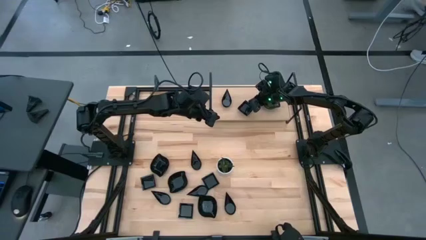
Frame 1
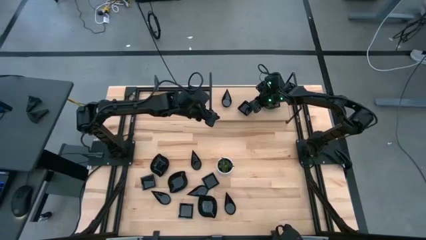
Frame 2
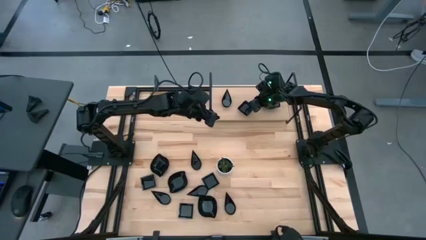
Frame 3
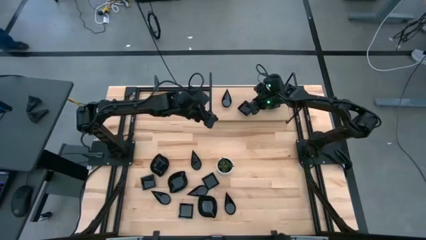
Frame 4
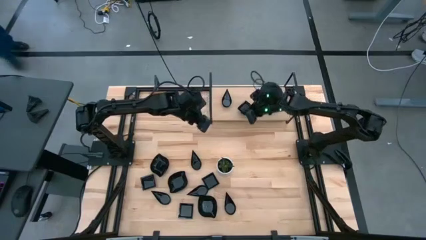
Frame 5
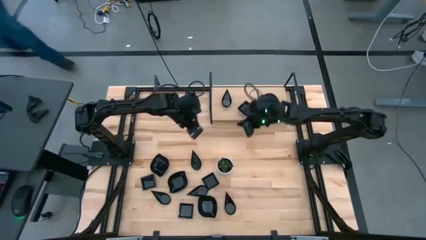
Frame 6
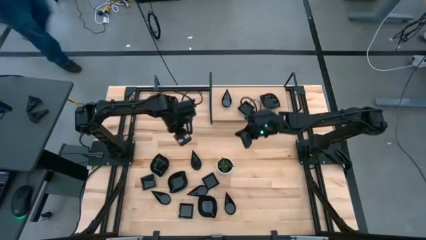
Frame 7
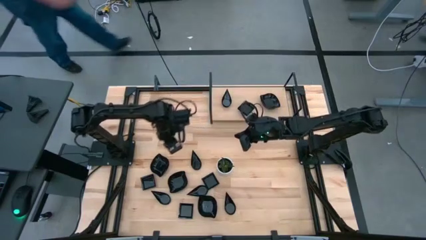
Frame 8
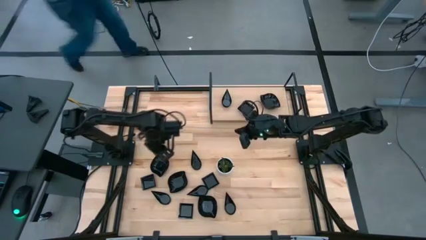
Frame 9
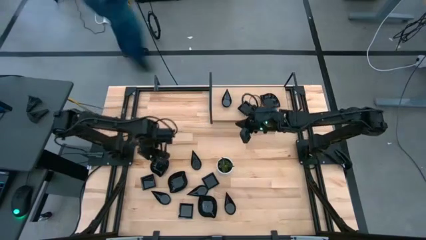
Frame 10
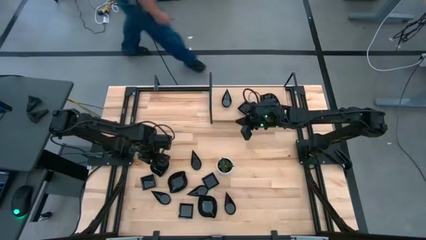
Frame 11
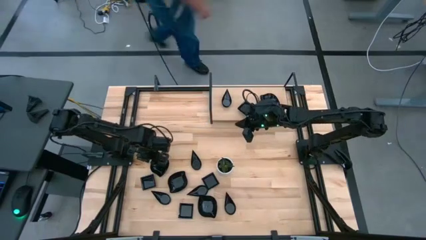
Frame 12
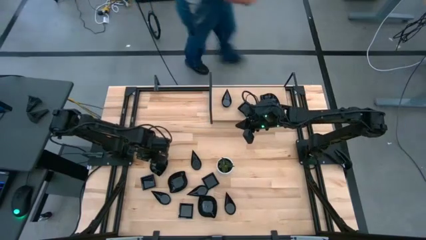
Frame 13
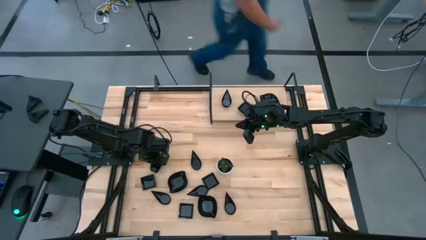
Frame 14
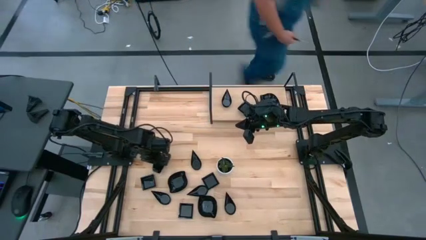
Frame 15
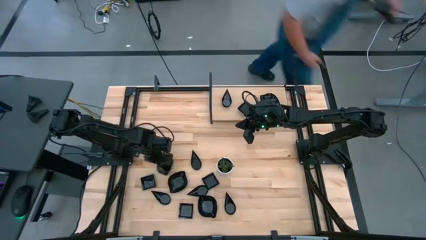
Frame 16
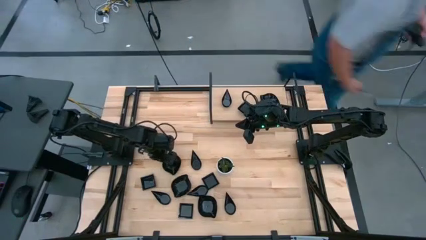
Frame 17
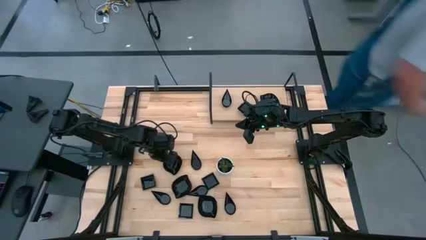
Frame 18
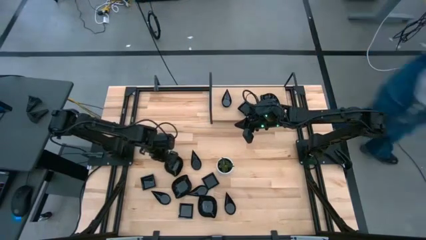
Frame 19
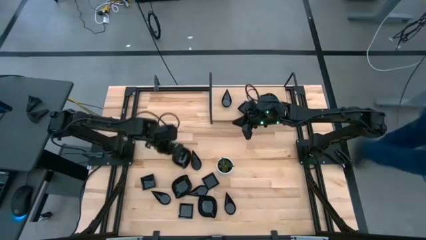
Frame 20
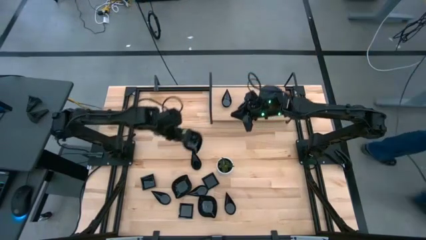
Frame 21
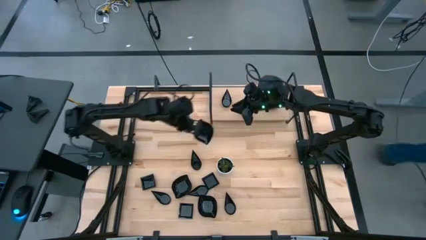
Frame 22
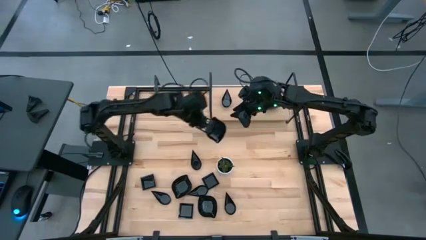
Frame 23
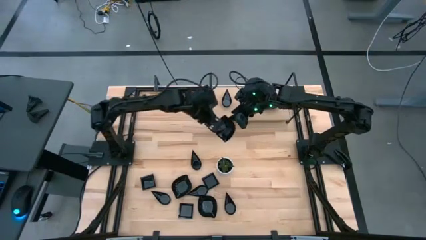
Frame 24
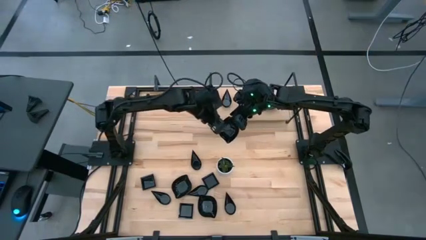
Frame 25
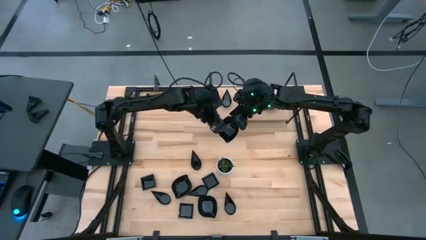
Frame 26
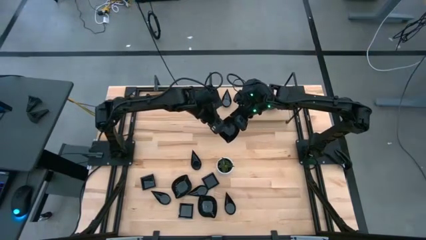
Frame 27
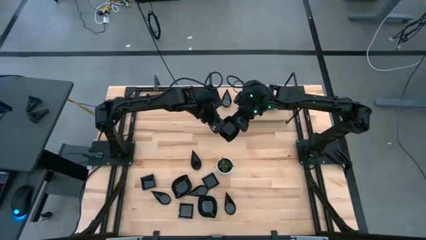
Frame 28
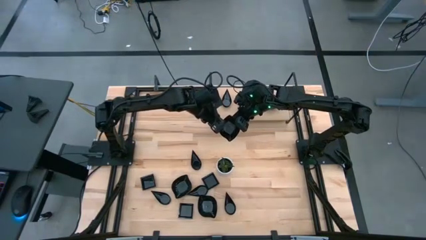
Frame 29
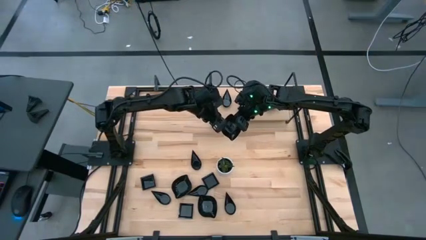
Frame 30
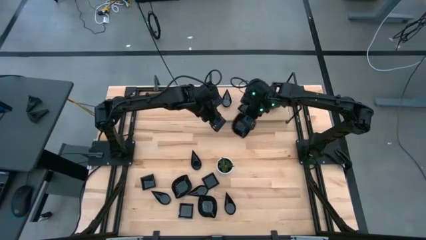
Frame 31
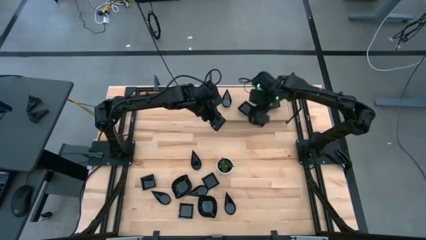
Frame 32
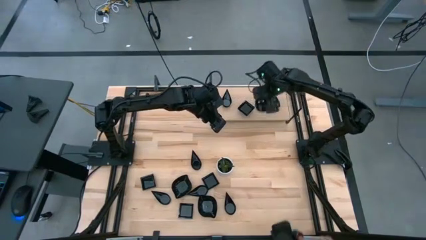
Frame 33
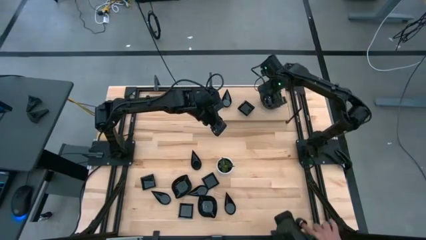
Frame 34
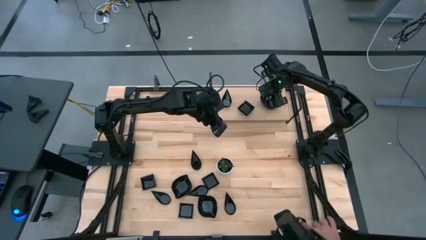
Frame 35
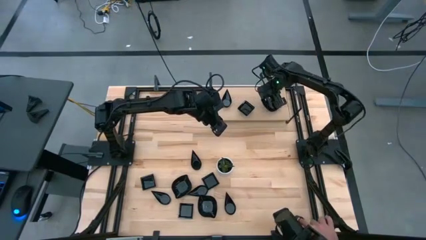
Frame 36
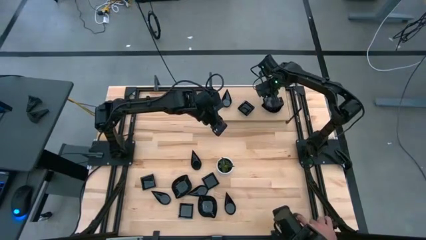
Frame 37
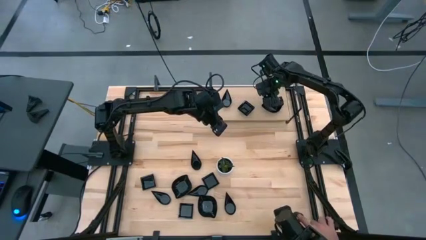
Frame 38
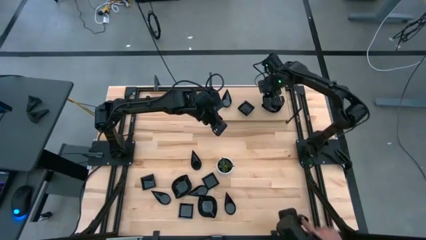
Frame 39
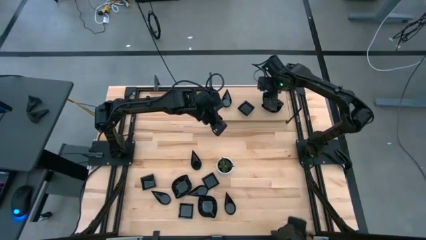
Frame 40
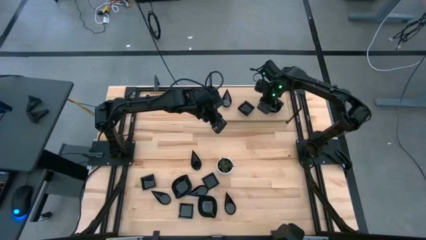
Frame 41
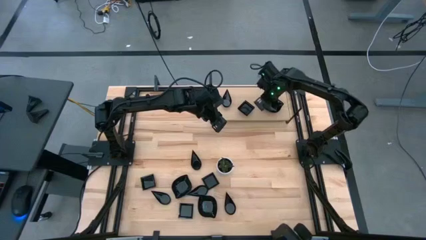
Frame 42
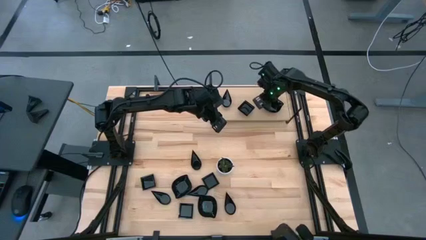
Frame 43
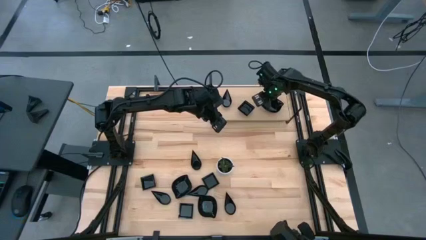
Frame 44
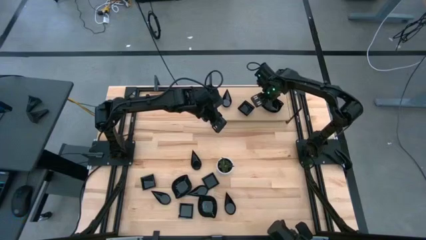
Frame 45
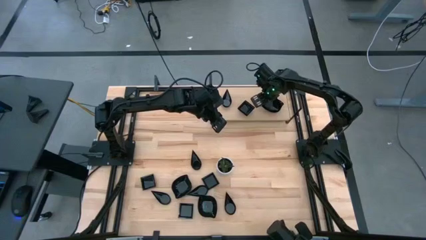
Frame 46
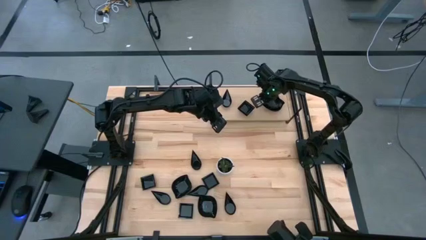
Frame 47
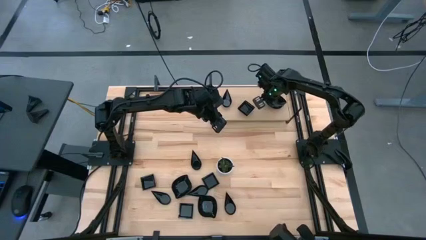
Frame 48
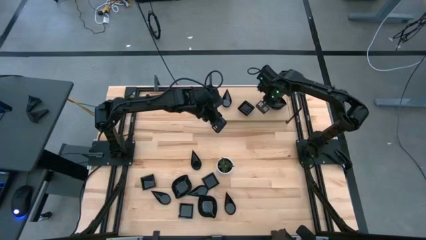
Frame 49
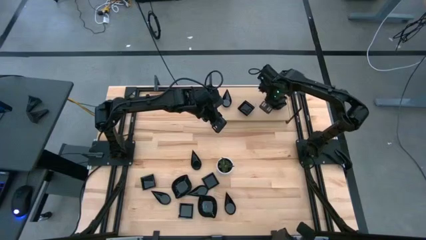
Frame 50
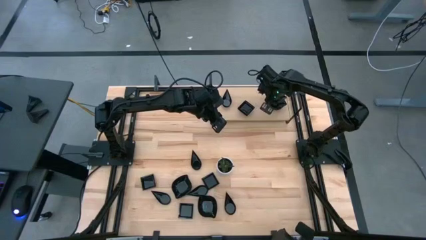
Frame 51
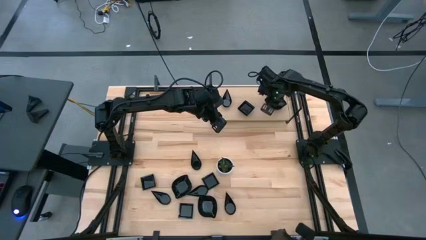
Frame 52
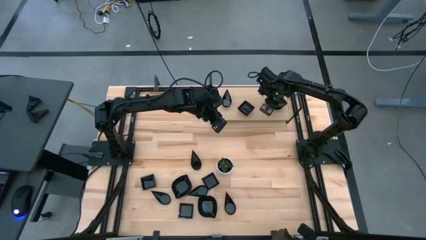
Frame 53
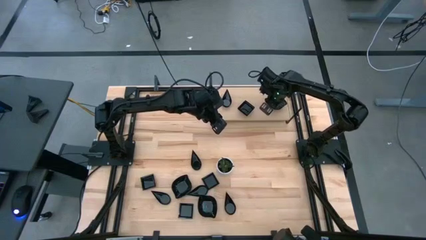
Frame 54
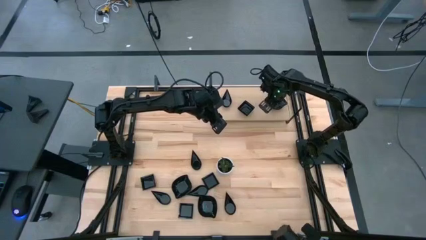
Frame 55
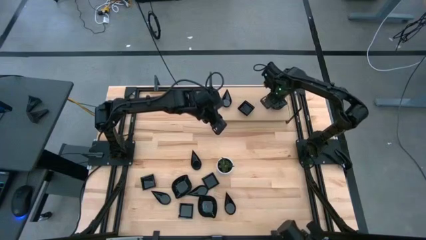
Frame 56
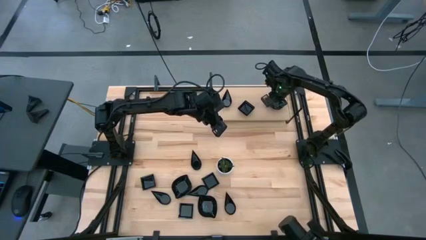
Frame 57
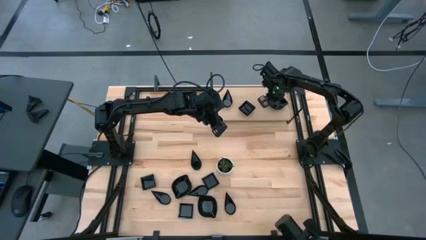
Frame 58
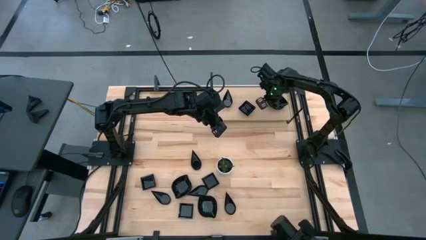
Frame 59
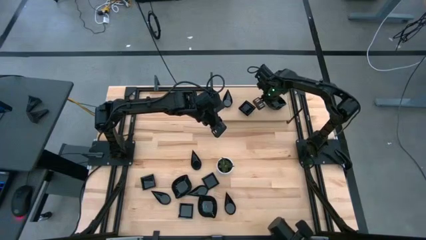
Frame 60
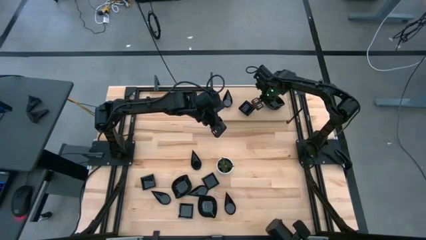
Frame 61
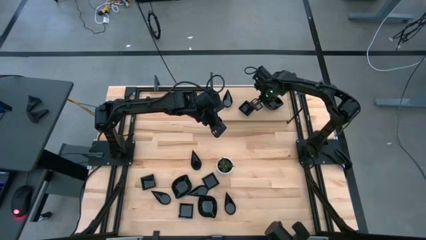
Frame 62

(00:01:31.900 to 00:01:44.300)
Task: Pick & Place Mini shaped plates
Stack the leaf shaped plate on top of the leaf shaped plate on the shelf

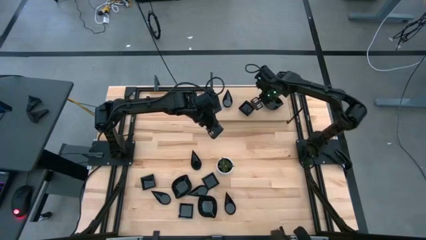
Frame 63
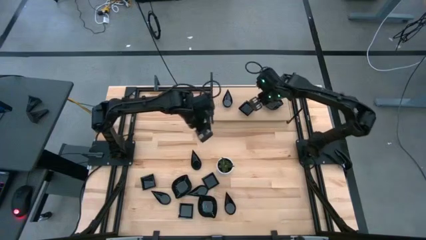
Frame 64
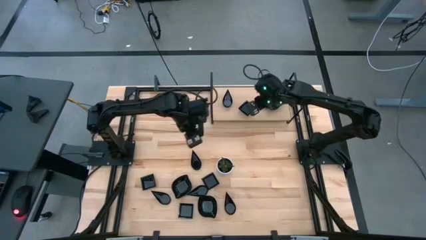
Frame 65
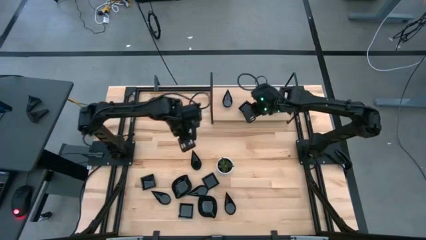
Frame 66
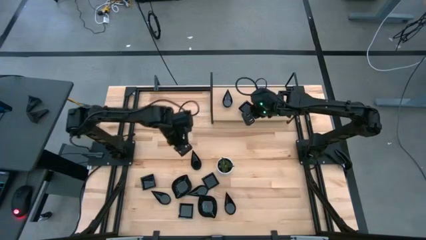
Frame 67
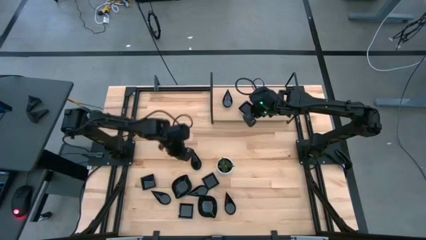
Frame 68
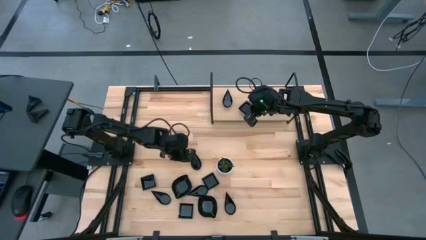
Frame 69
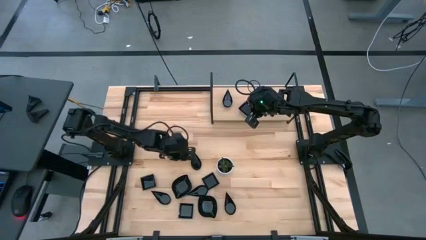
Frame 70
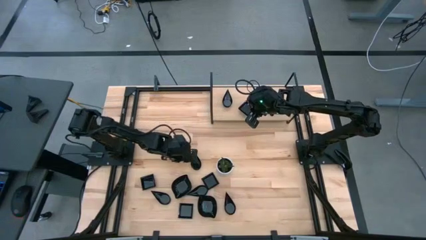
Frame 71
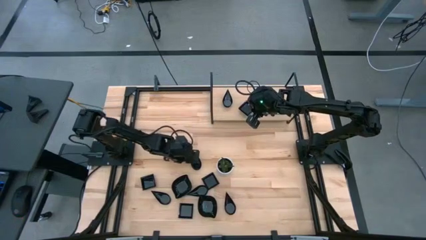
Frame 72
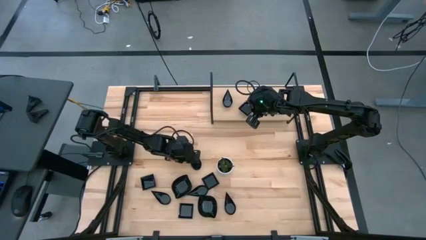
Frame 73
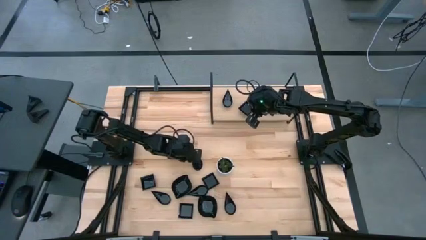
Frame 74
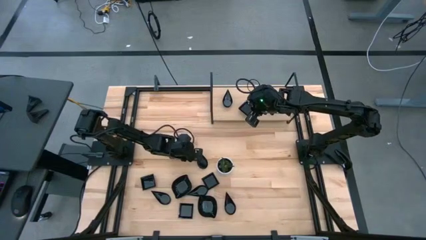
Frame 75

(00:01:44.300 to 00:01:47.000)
Stack the drop shaped plate on top of the drop shaped plate on the shelf

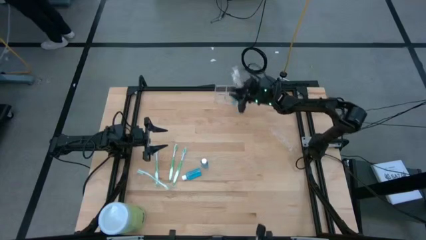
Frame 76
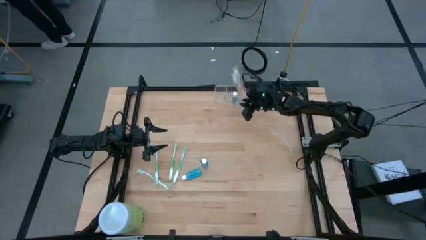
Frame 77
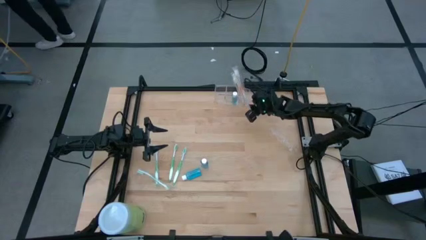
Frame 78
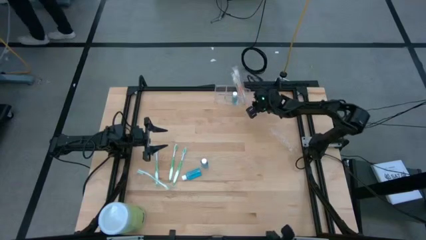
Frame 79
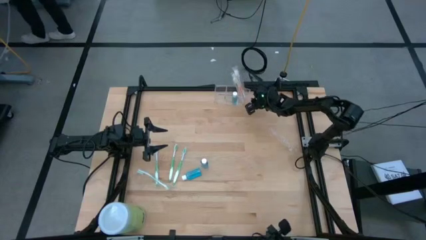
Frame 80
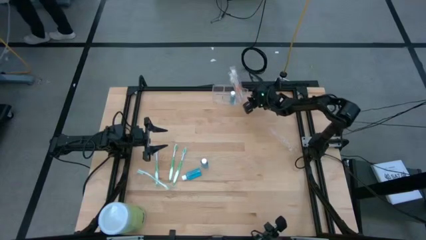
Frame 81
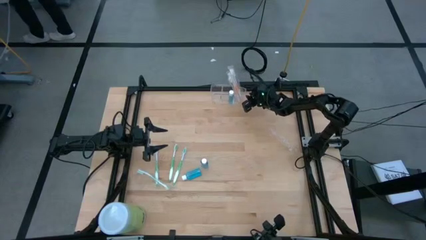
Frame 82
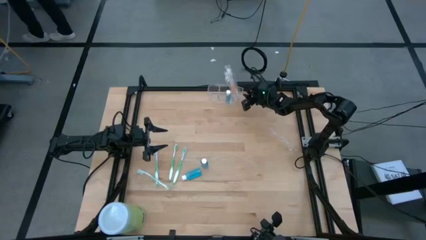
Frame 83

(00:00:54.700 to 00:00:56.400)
Task: Pick & Place toothbrushing station
Adjust the transparent organizer
